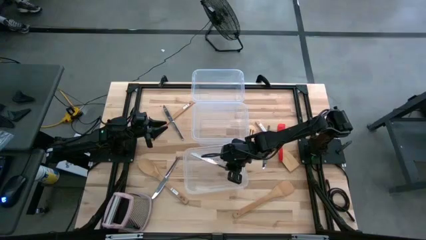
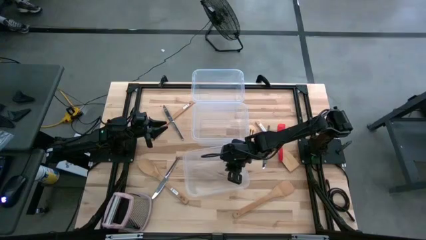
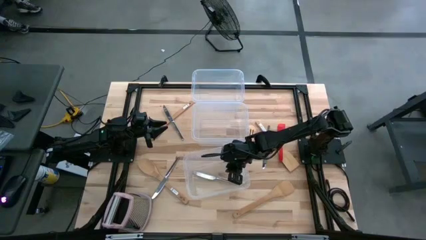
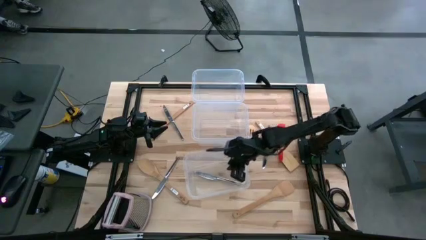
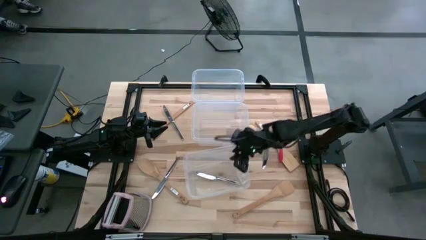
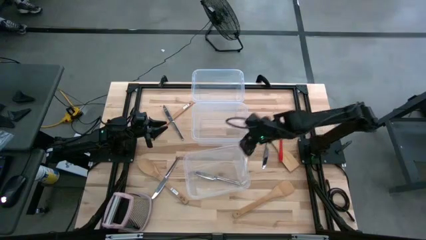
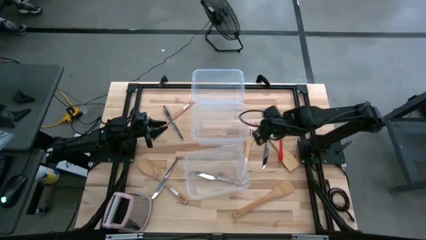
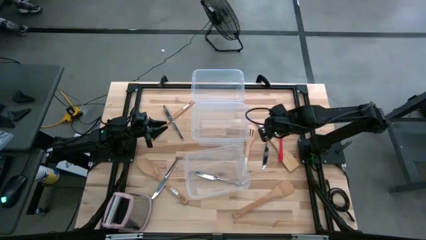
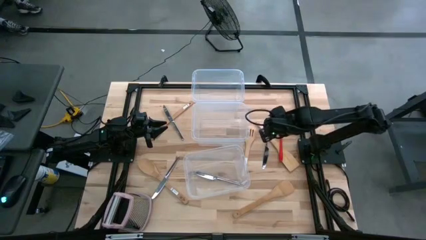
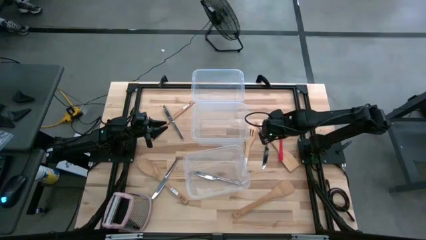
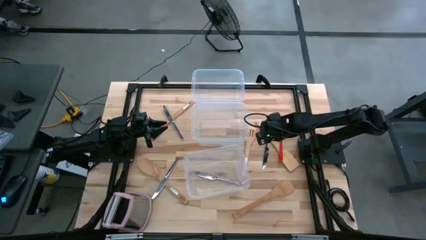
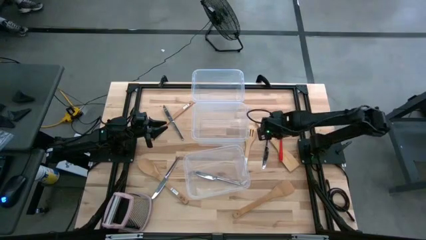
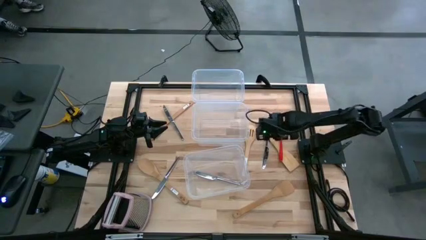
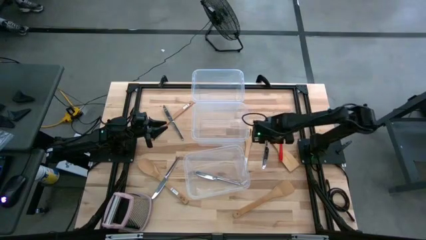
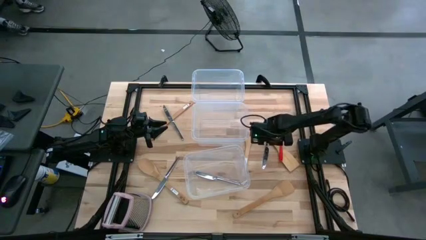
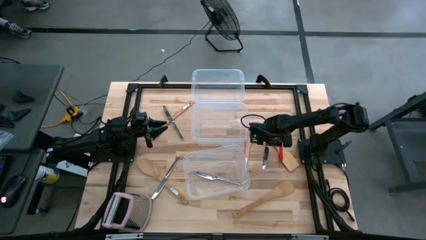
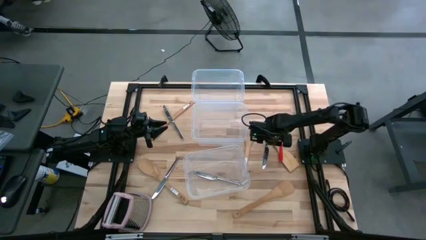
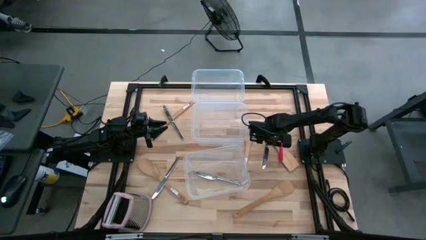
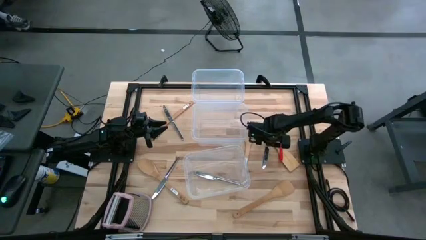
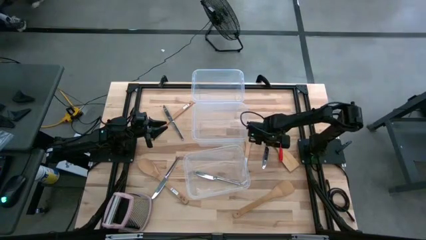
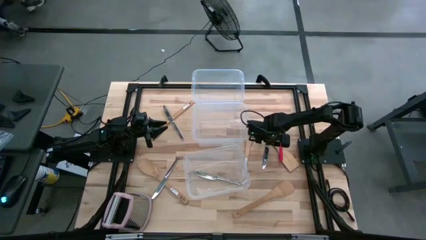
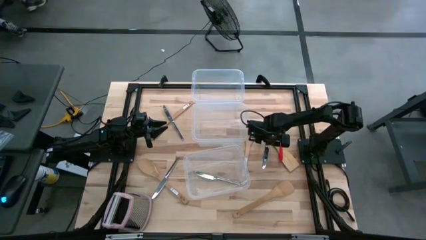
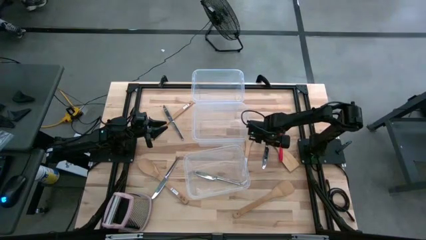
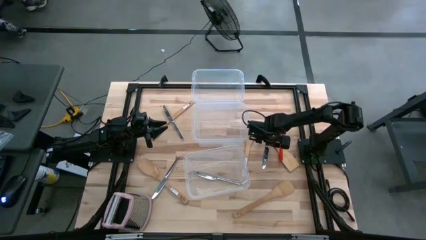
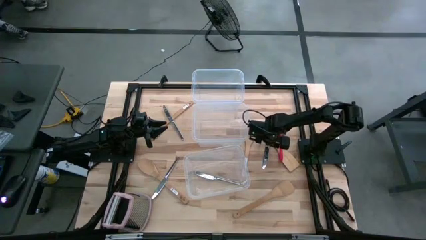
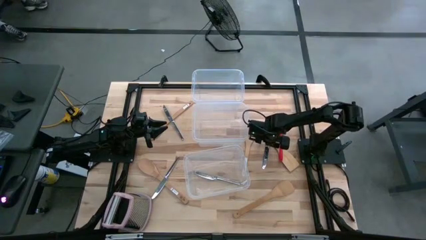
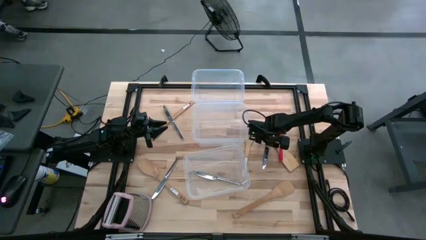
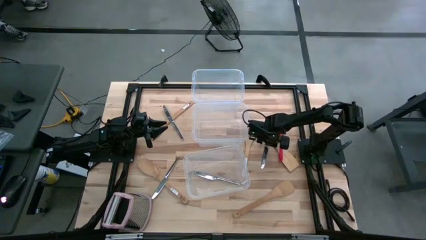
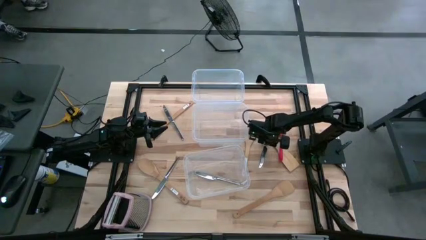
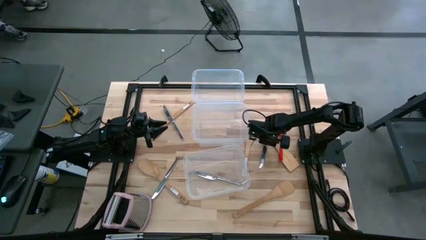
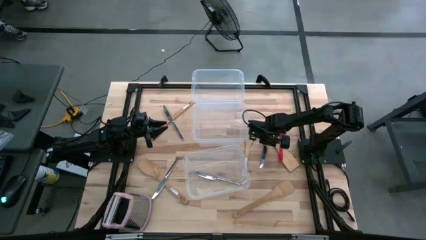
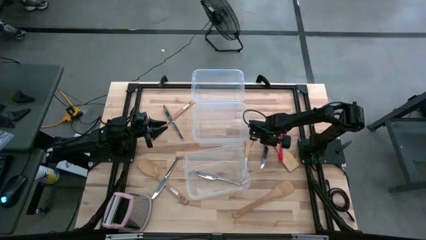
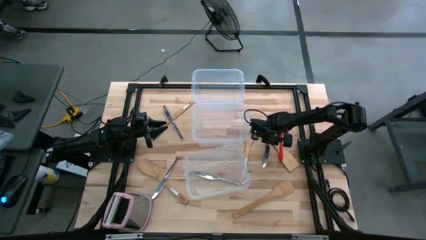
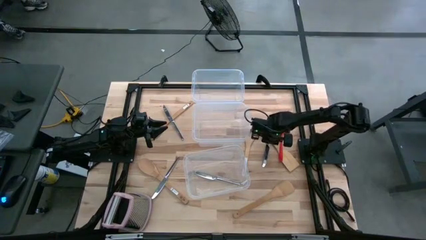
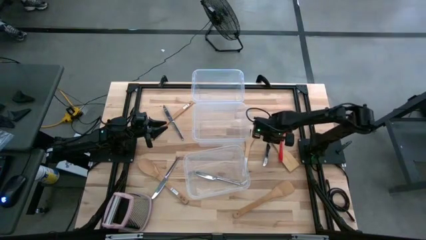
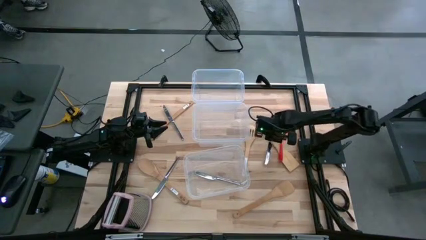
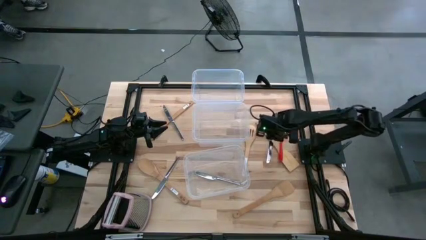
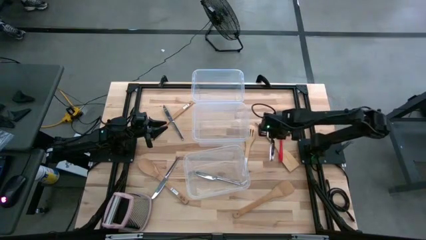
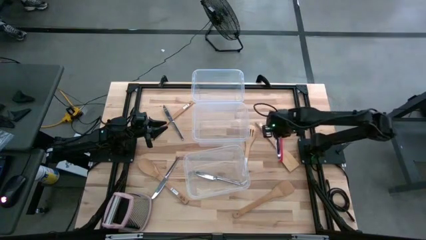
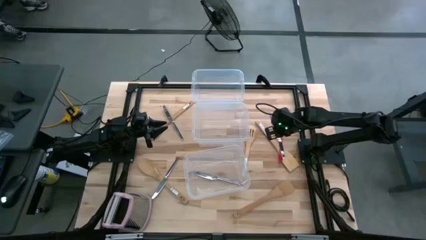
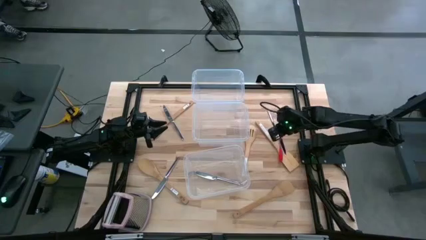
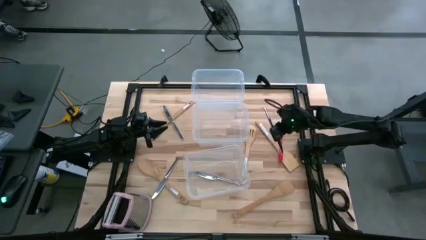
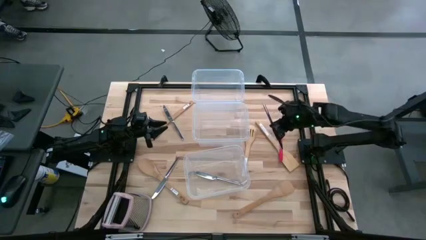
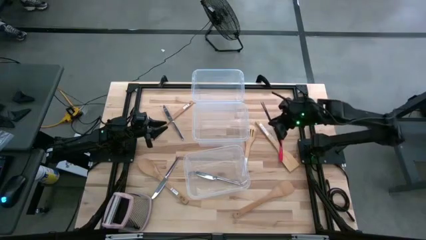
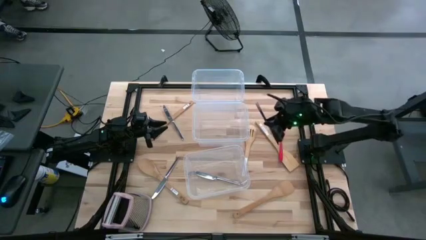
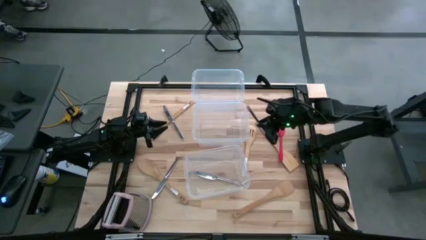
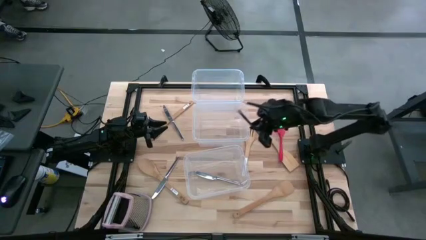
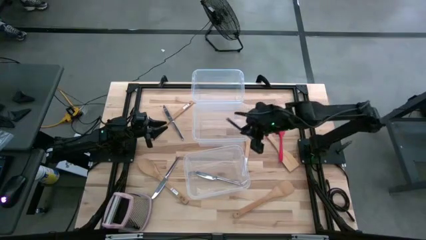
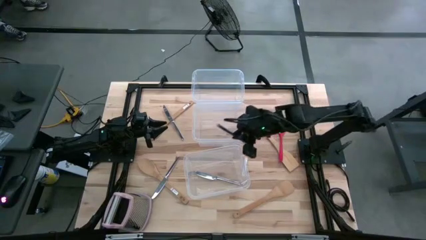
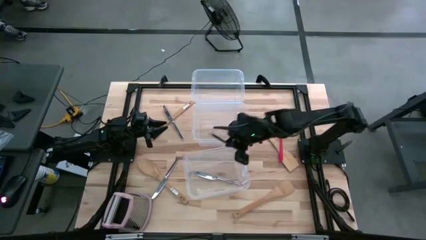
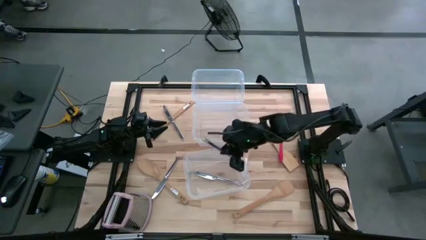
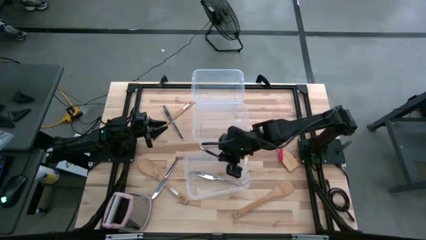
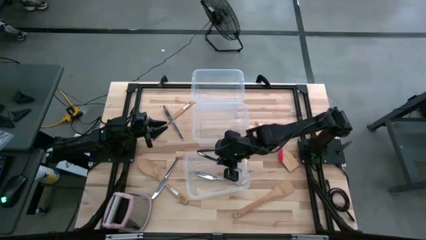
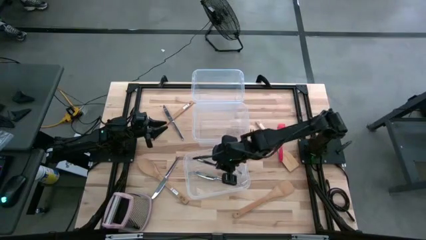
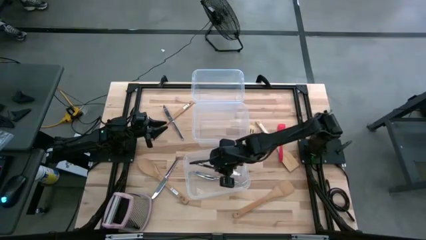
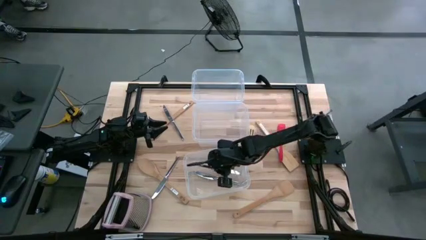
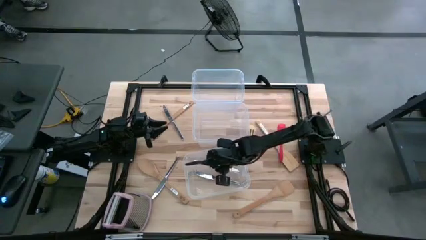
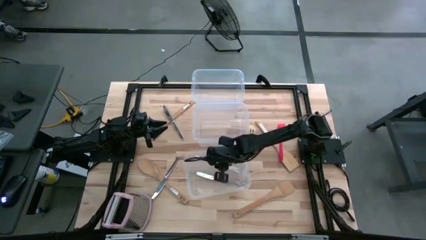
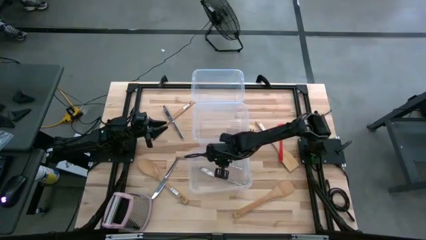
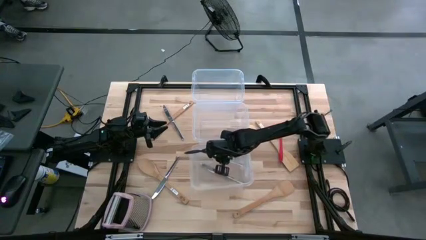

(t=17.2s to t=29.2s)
Task: Pick & Place Kitchen Items
Put the silver knife into the bottom transparent bin
